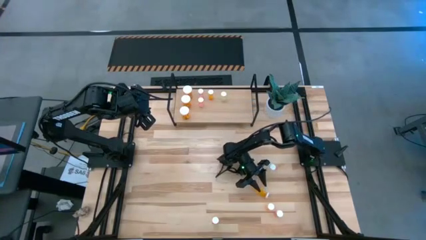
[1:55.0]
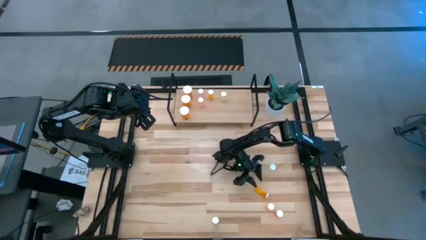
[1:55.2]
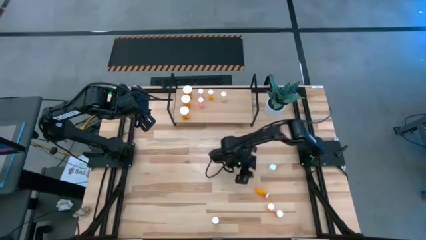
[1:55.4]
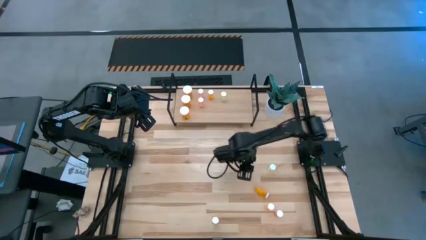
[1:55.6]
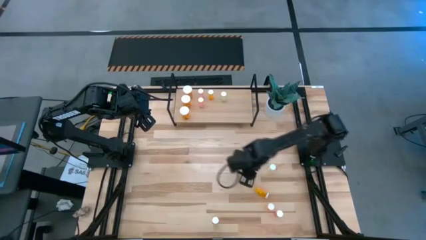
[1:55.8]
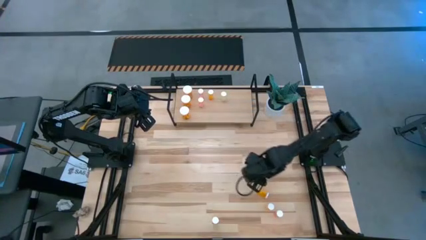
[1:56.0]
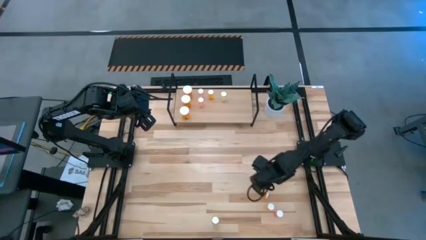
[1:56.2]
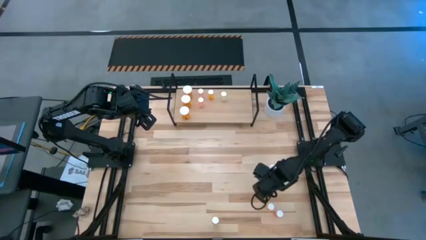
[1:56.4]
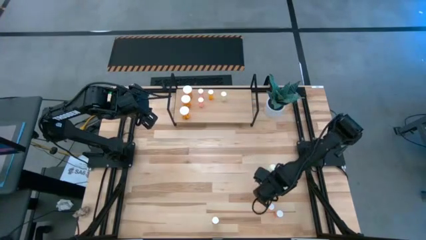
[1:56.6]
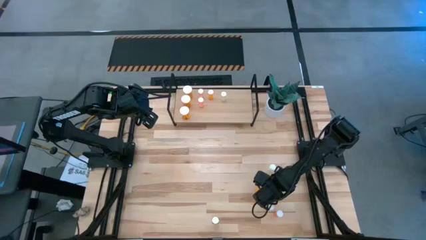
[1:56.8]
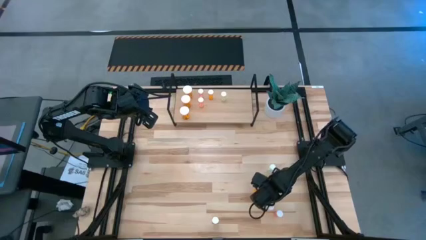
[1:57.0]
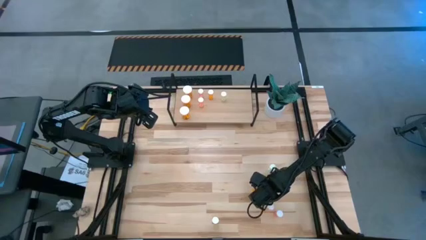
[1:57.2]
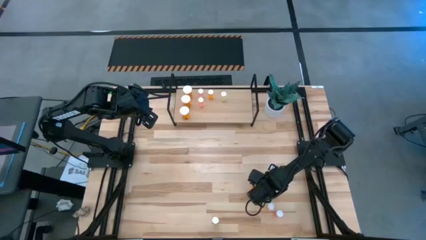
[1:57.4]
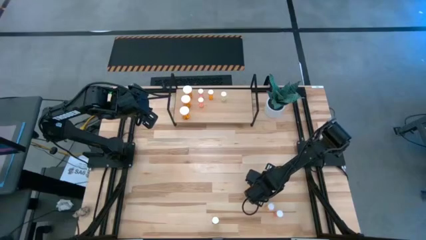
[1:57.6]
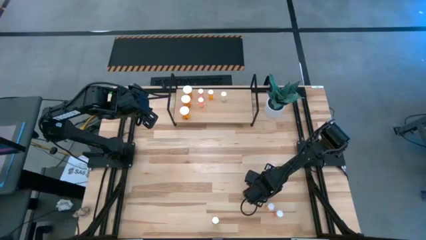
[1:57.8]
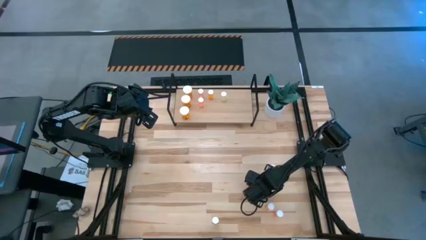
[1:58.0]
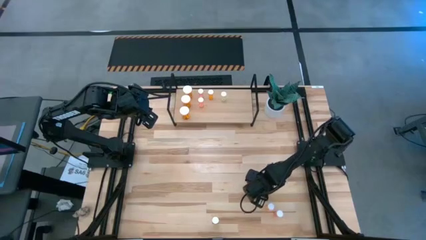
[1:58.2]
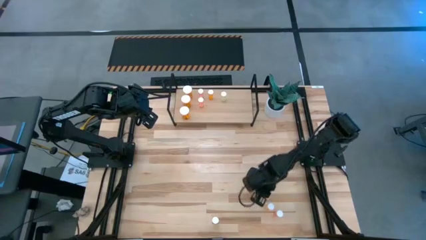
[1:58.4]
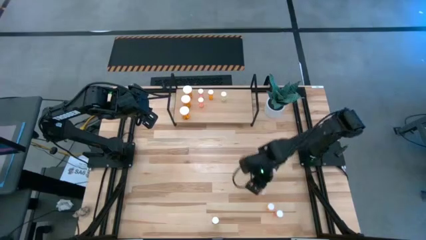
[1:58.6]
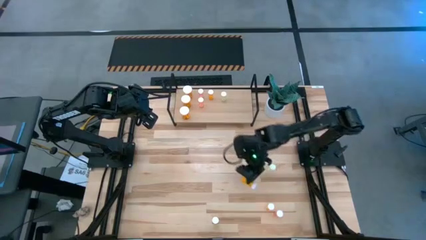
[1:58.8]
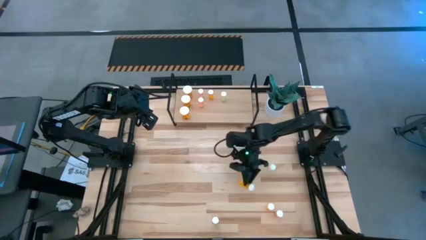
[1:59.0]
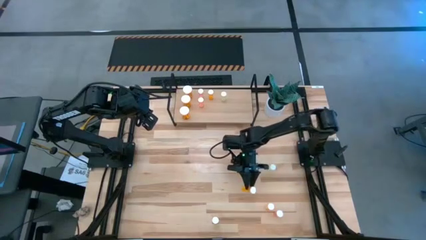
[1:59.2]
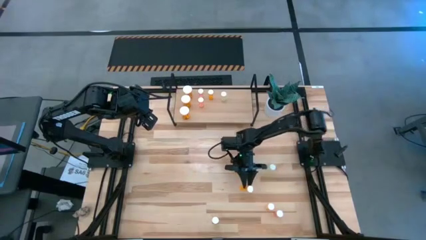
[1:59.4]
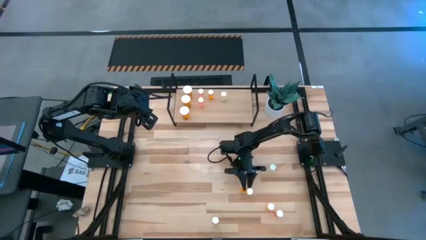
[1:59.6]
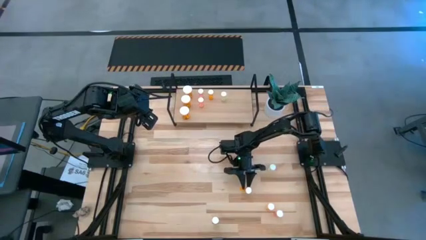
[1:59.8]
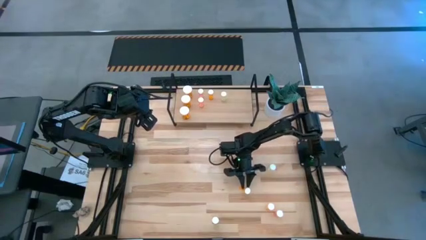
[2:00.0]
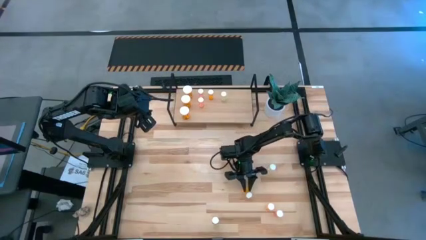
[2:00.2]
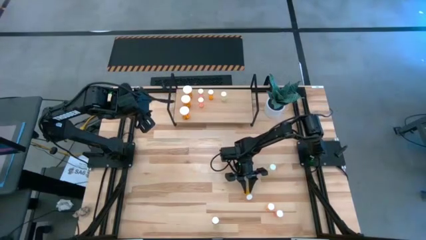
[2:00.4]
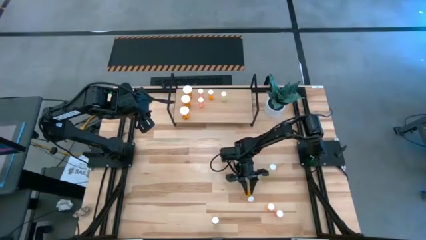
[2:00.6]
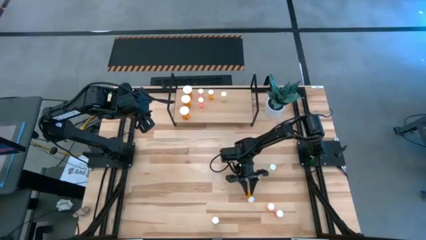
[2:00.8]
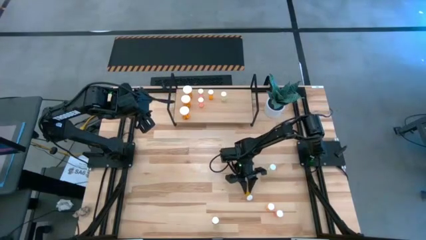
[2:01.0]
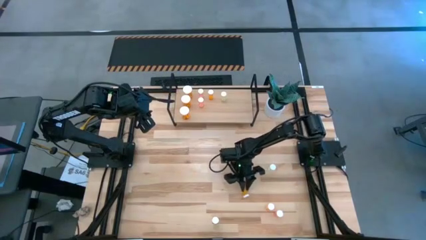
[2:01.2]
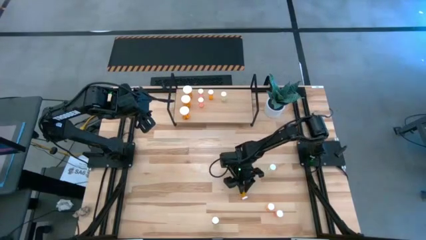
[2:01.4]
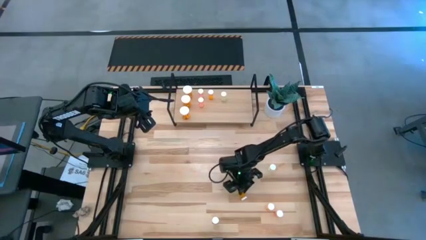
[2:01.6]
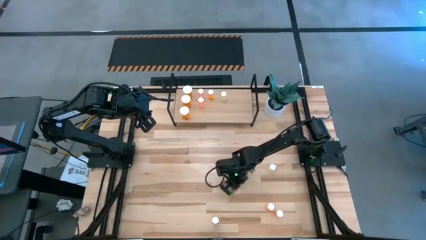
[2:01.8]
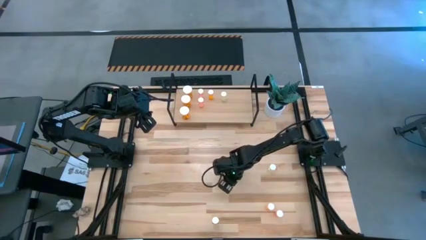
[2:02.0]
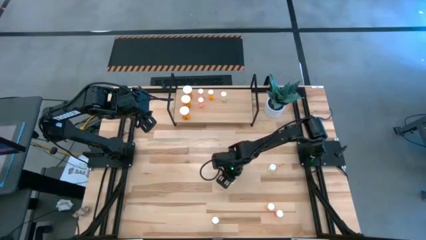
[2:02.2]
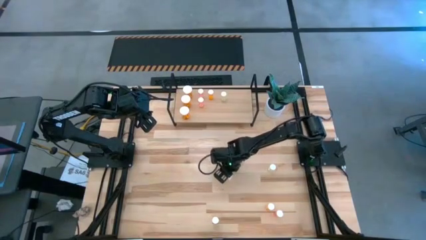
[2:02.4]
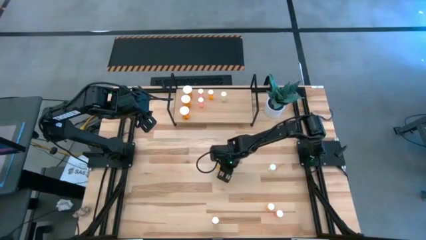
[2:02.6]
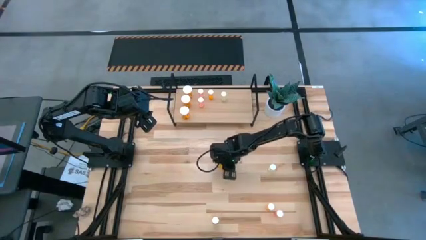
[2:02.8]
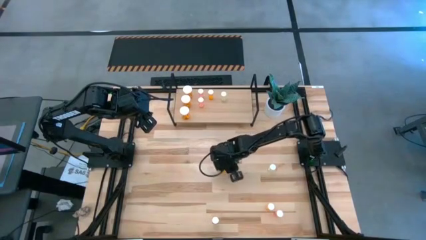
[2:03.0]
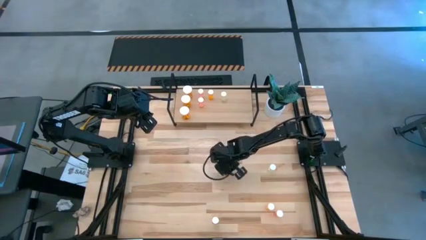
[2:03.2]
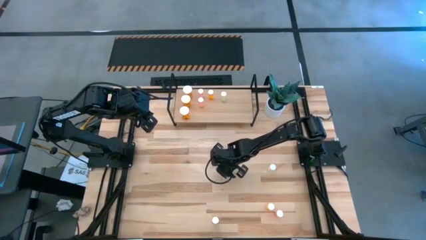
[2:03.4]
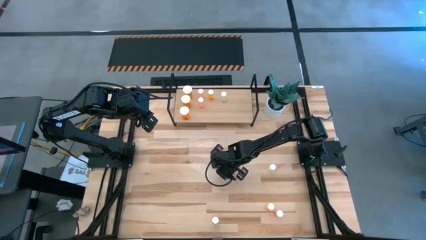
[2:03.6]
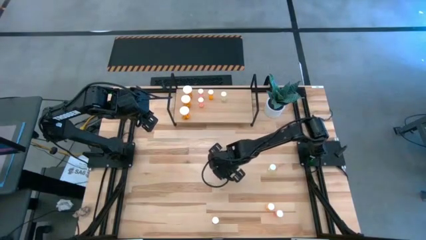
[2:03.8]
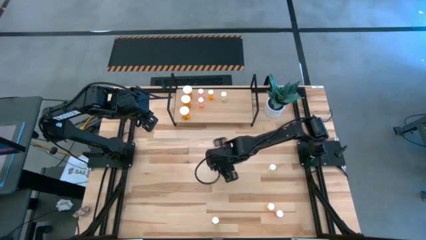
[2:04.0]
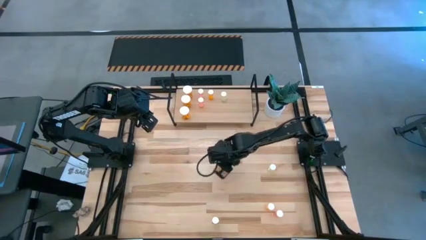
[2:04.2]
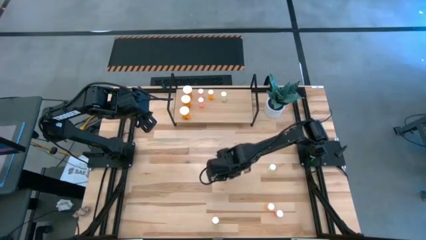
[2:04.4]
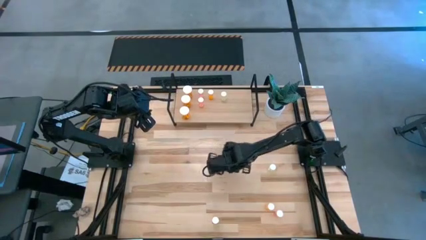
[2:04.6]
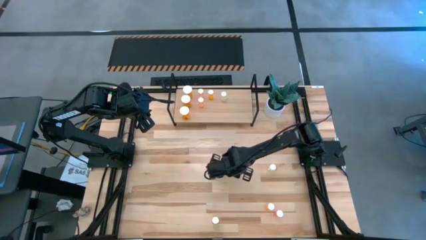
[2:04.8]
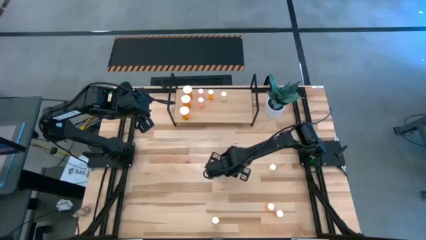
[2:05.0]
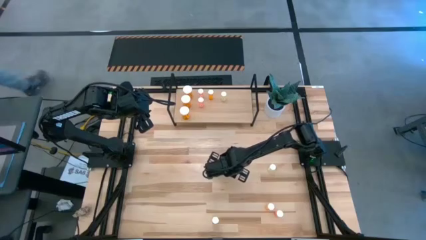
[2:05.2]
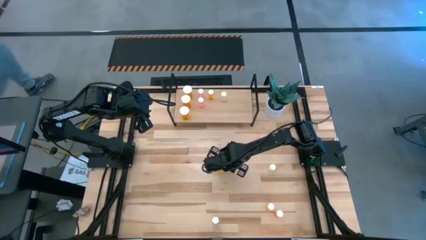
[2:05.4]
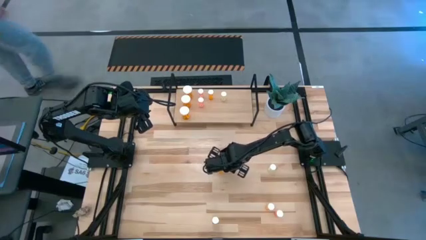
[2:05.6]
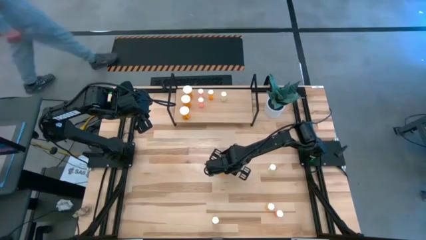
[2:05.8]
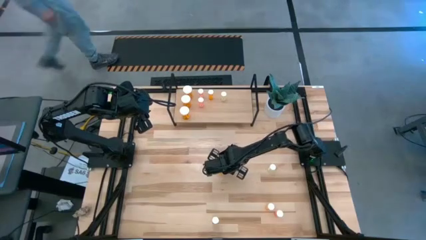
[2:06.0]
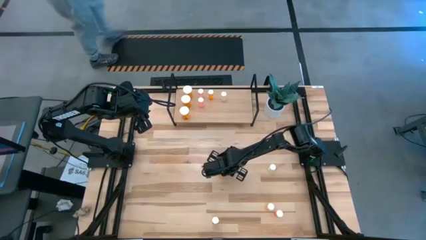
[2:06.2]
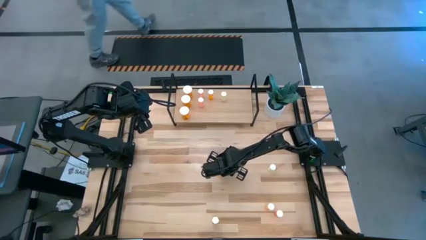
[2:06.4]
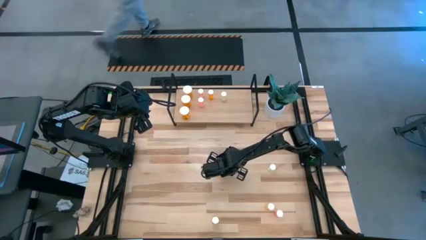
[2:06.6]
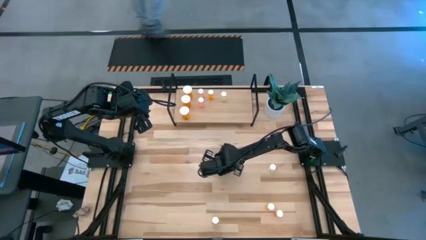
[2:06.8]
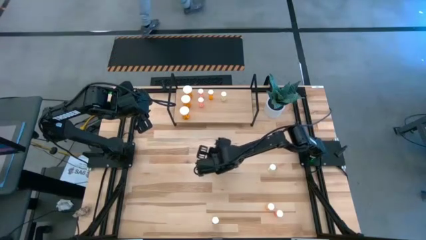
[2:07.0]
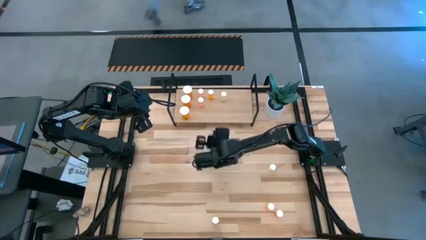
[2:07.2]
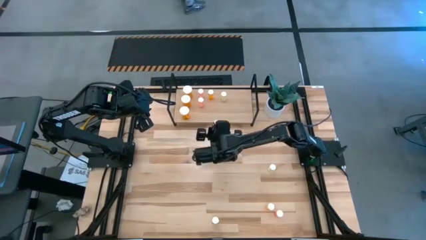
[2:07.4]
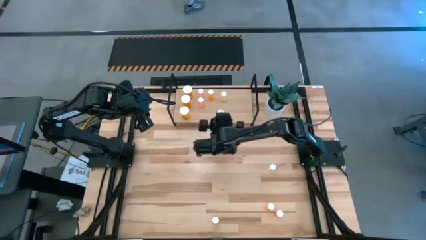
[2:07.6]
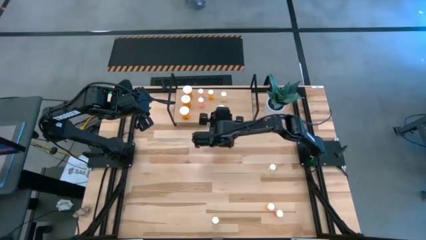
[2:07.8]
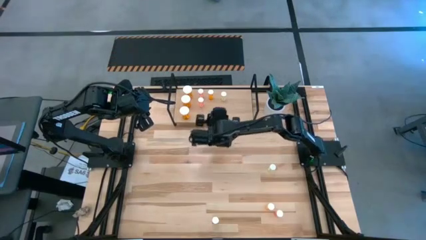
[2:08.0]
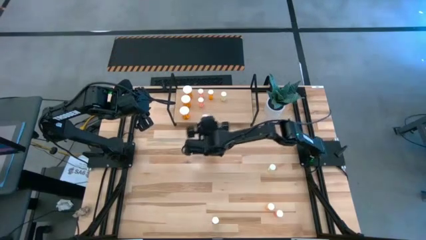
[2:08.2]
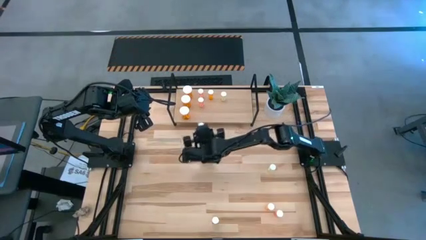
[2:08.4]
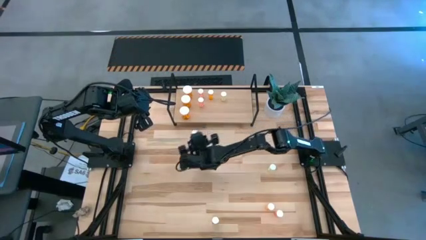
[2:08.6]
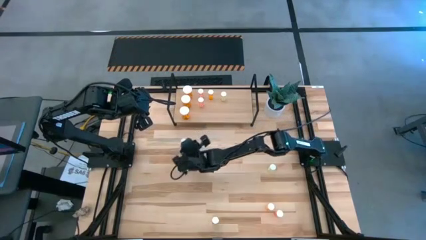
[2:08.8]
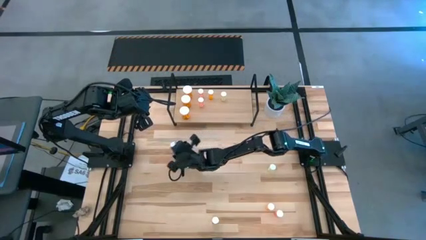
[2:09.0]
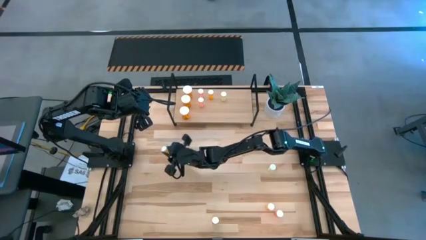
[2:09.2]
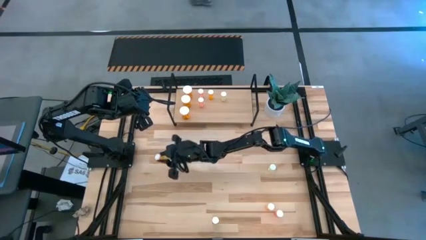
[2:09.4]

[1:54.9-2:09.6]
Task: Pick and place medicine bottles onto shelf by color
Put the top small orange pill bottle on the shelf aligned with the other small orange pill bottle

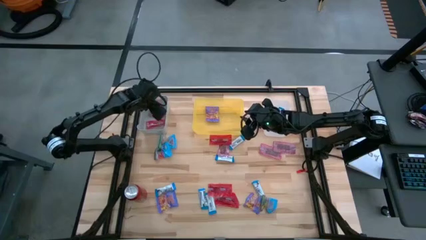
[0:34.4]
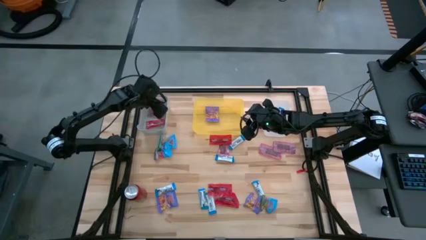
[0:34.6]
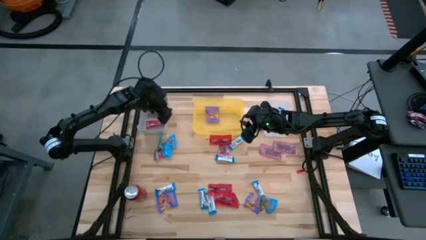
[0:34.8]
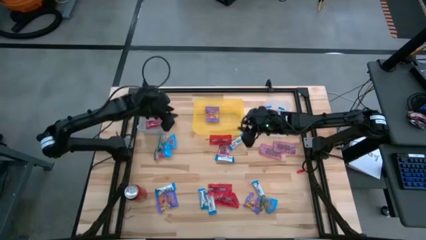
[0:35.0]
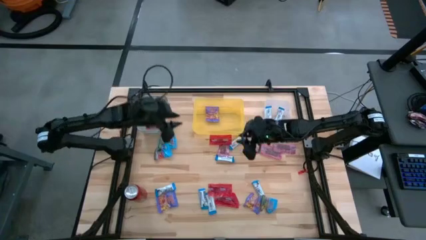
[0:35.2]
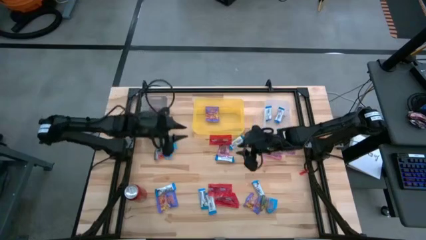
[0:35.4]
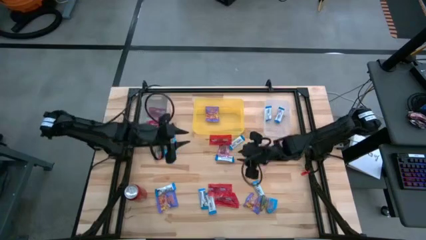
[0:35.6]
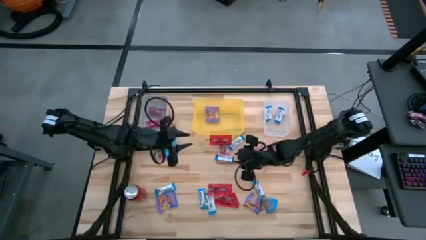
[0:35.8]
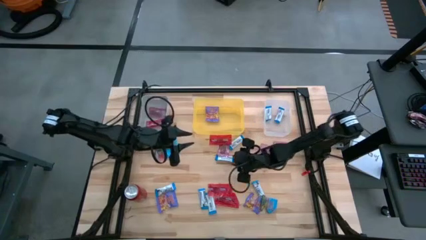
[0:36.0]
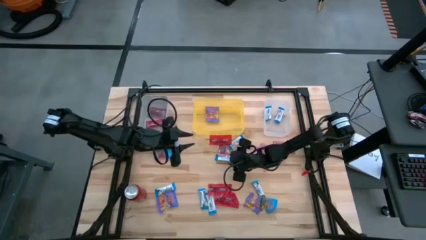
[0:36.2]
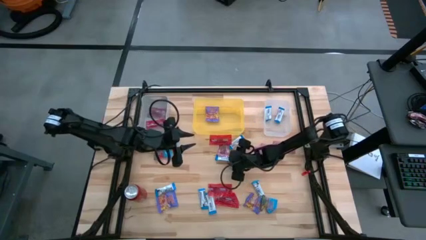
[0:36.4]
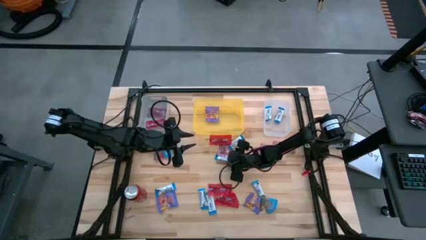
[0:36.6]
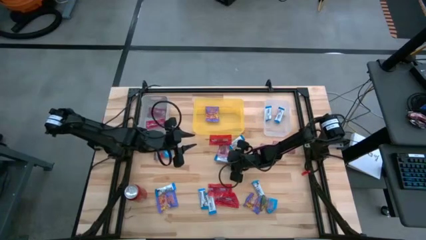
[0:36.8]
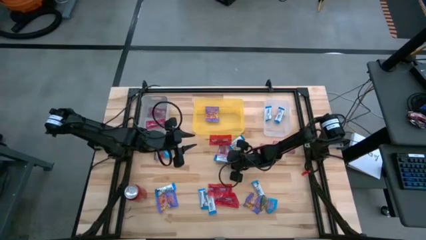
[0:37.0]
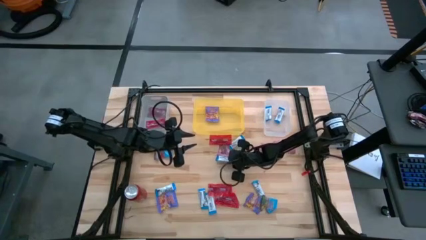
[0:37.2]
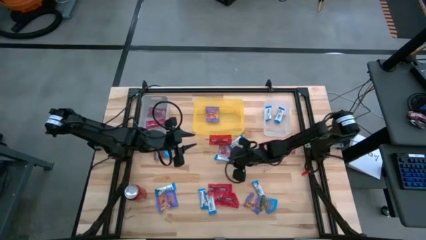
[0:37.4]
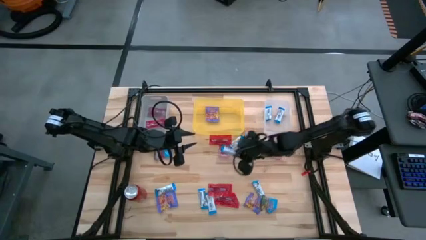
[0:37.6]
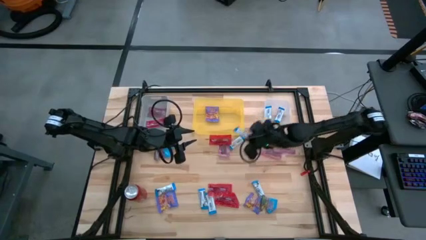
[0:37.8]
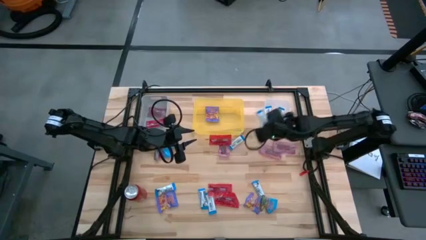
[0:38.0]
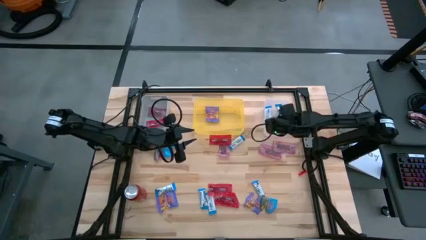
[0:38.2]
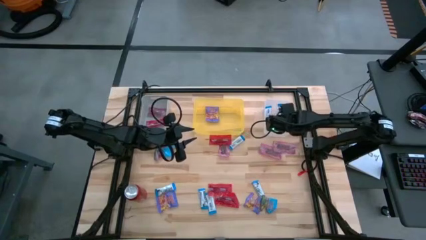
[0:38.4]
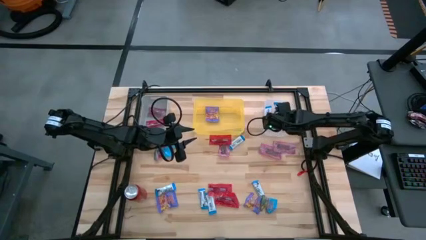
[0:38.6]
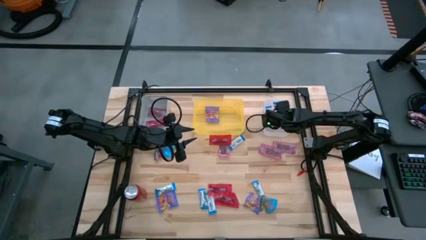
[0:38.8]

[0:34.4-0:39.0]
Task: Sort candy
Put the white chocolate into the transparent bin
